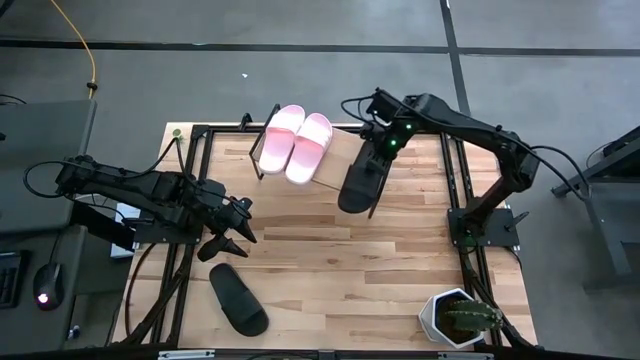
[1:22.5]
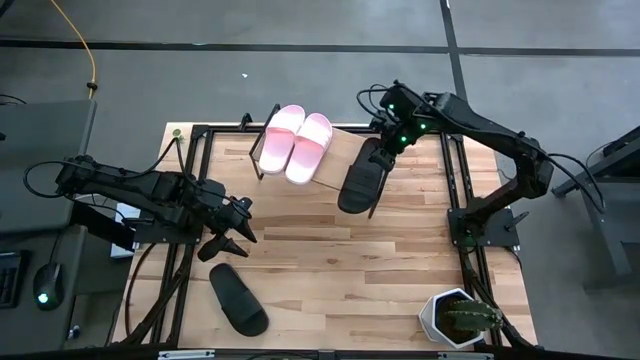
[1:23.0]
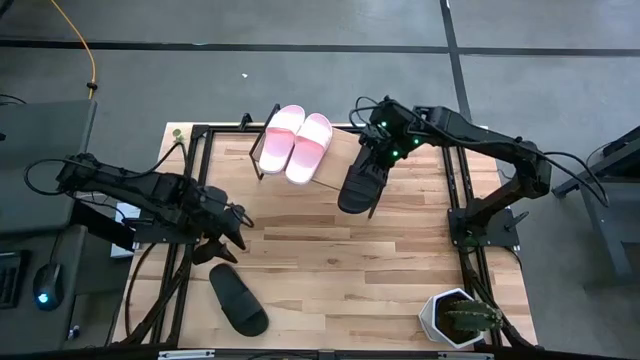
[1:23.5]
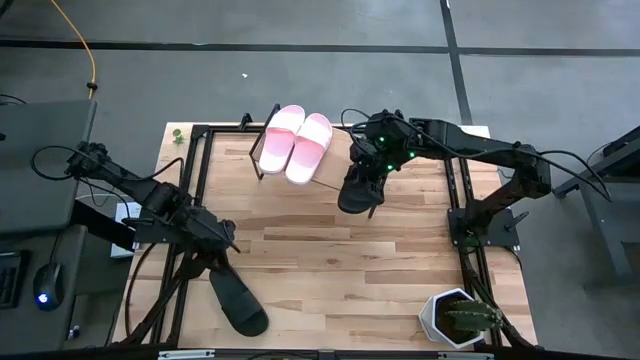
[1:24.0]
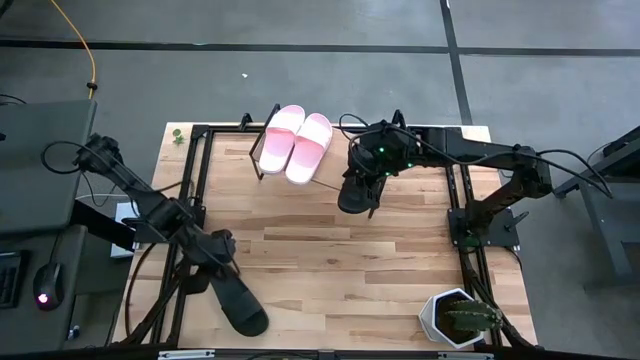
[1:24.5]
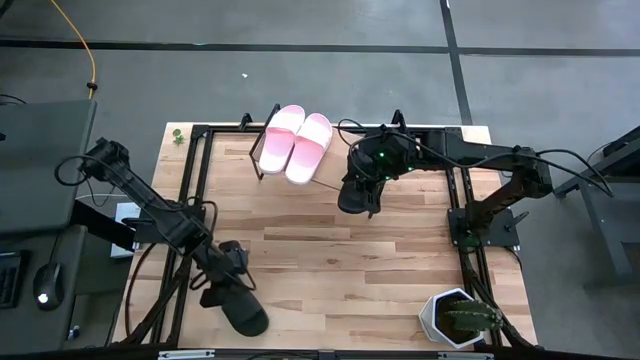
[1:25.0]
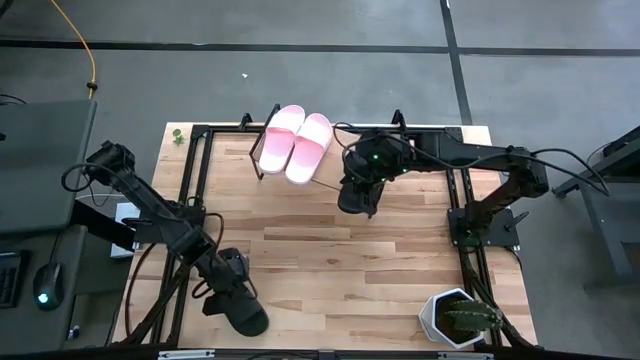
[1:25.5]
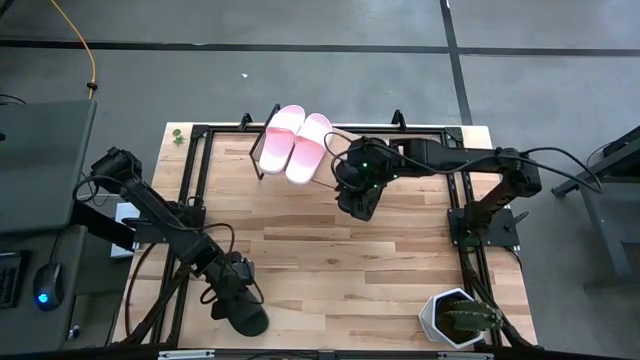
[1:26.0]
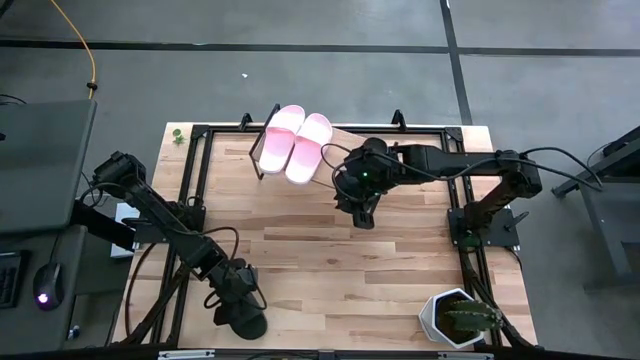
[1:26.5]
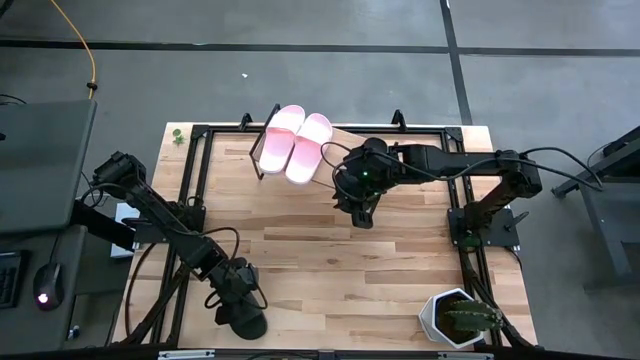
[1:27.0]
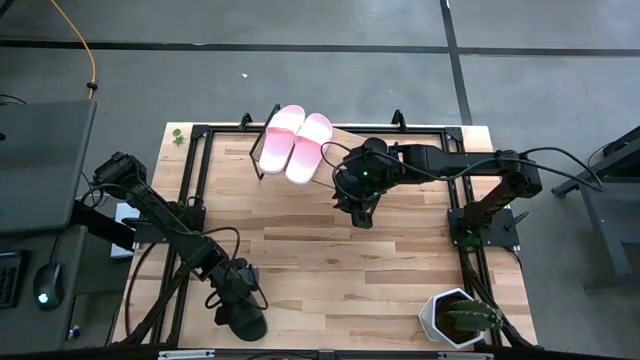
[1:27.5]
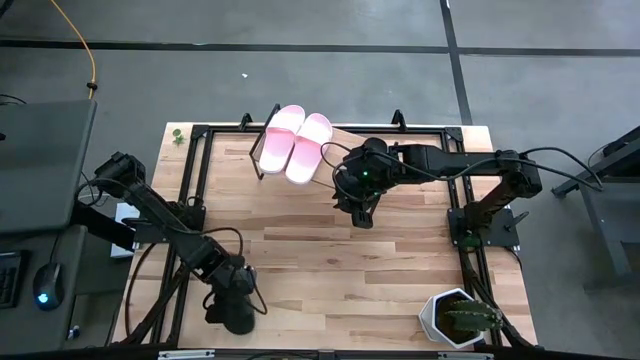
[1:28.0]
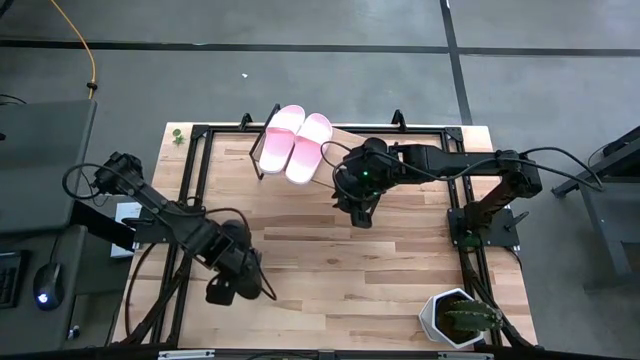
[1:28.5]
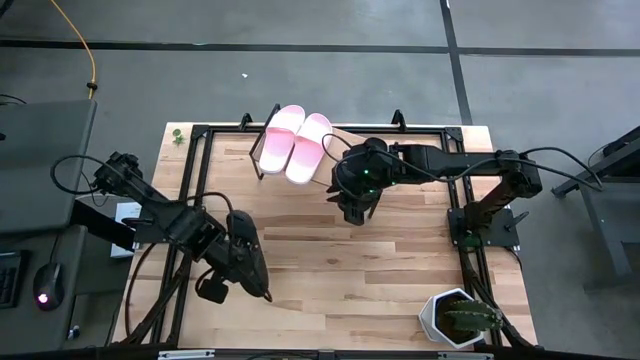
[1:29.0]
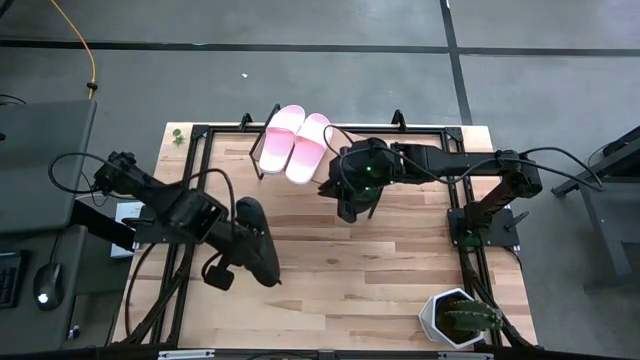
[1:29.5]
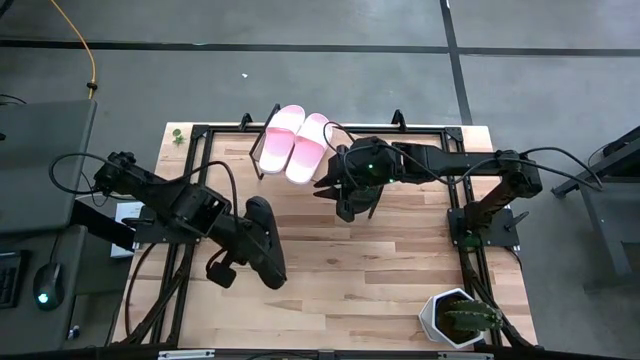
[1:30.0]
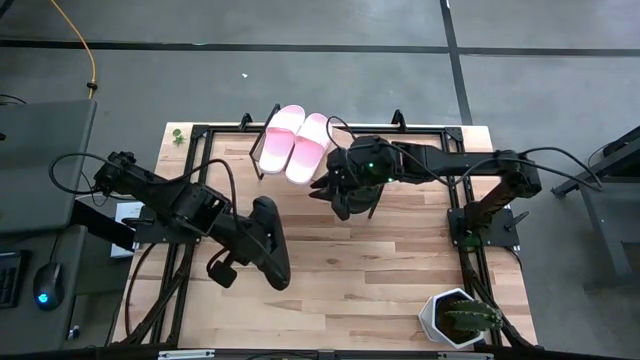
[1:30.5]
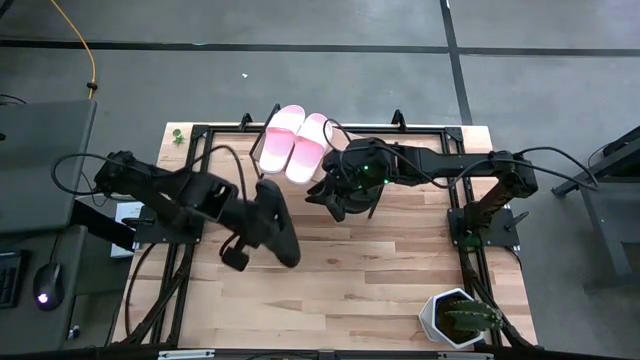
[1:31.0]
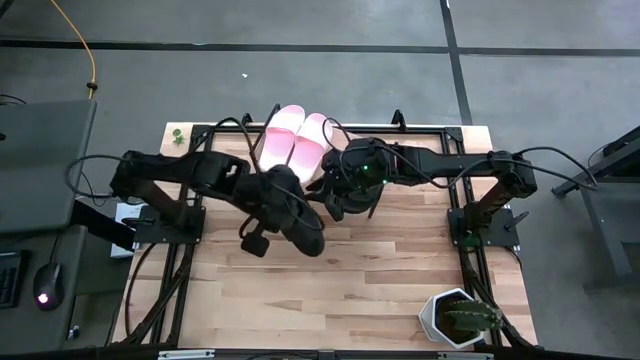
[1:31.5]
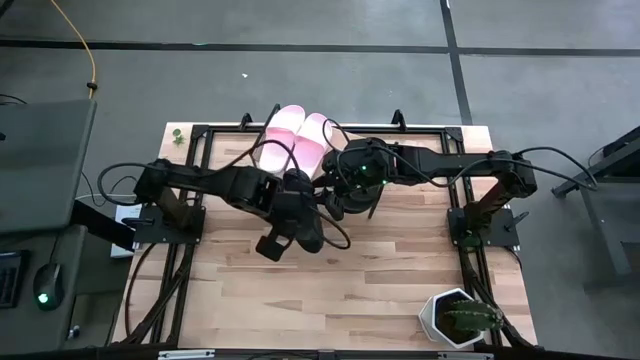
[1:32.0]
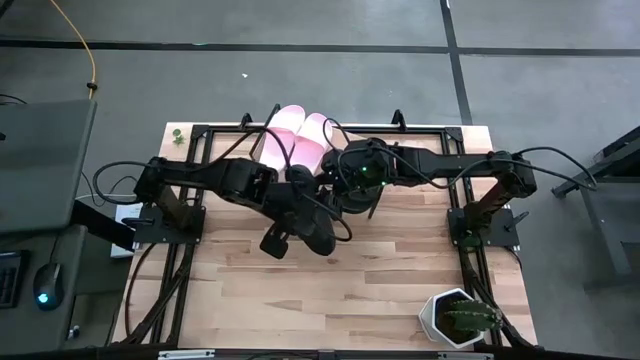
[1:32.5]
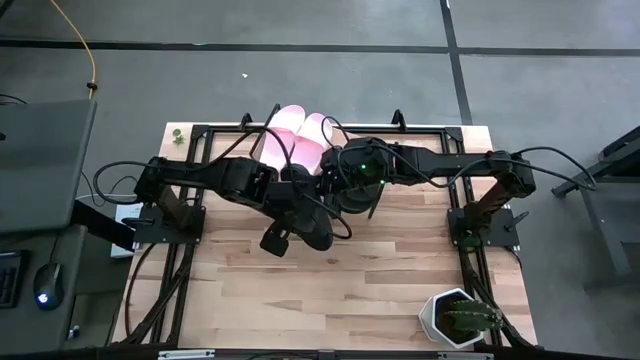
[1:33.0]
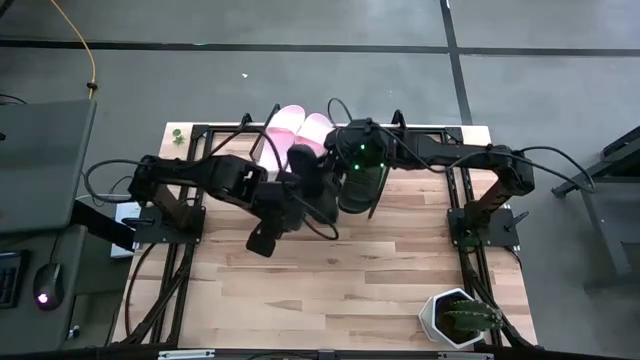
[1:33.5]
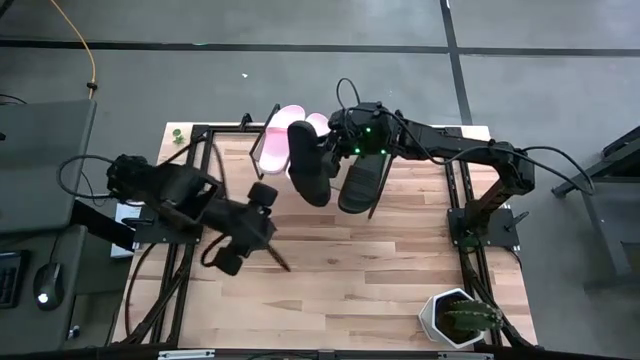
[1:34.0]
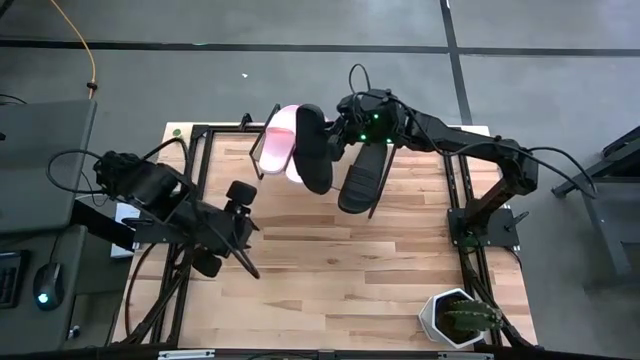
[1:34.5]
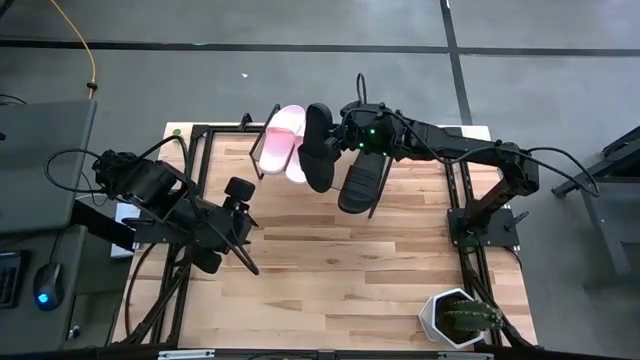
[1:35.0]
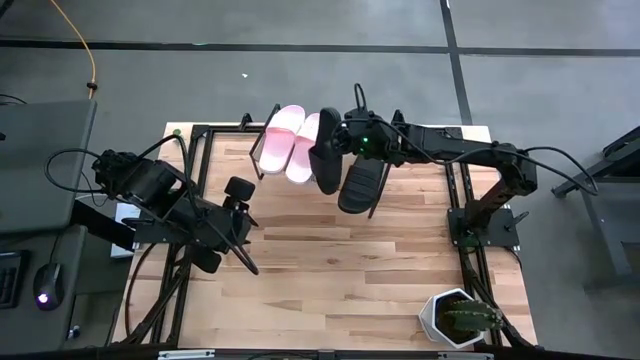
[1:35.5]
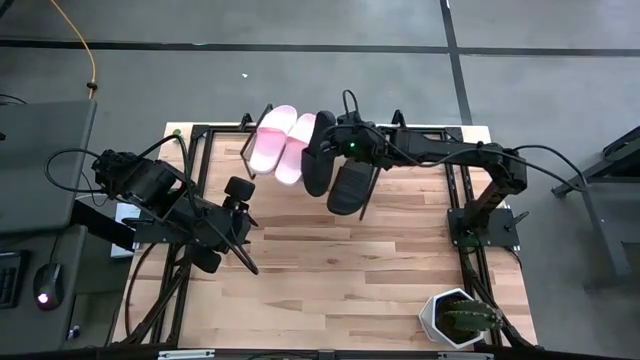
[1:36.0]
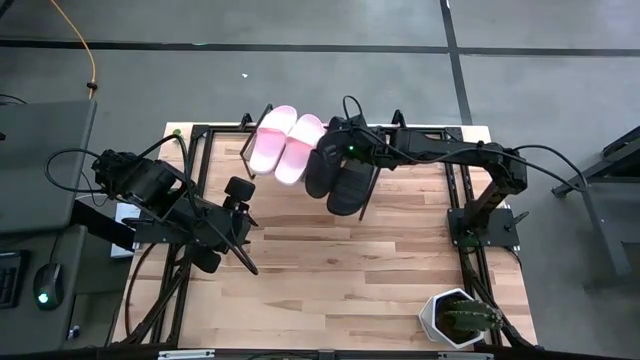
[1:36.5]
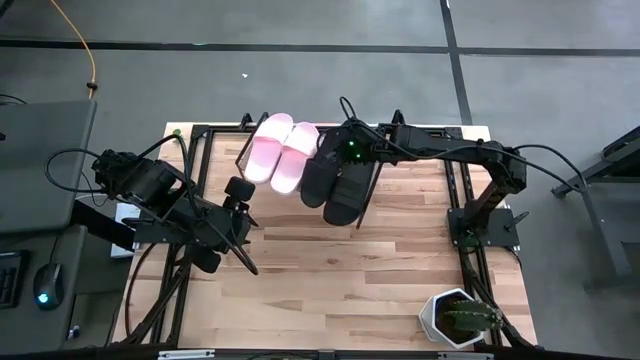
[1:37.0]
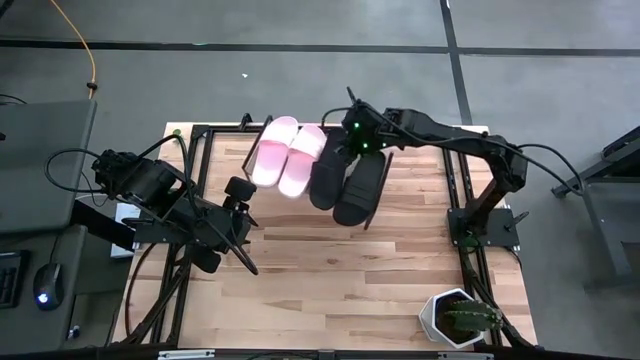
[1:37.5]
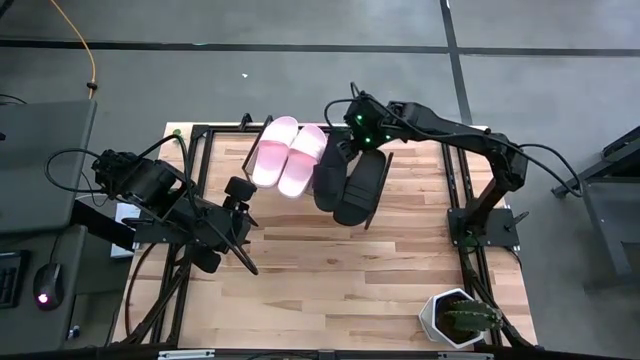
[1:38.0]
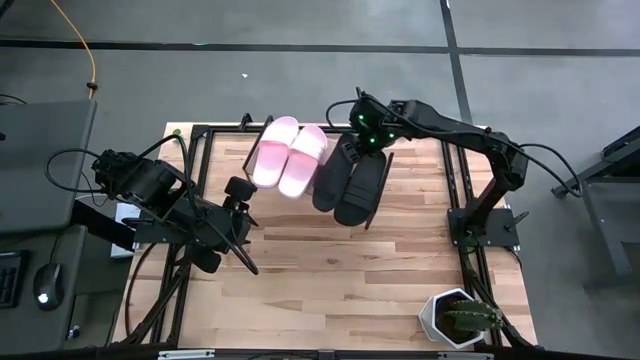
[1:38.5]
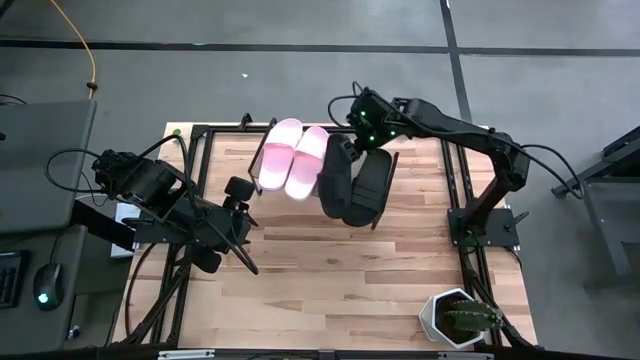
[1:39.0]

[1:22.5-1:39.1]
Task: Pick and place slides into the shelf
Put the black slide on the shelf

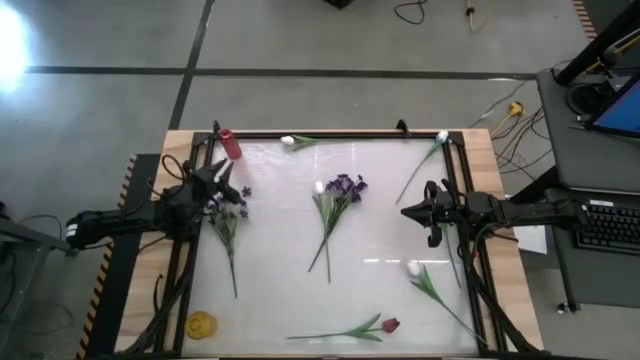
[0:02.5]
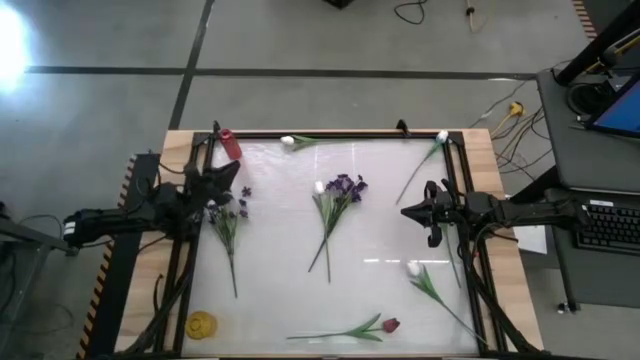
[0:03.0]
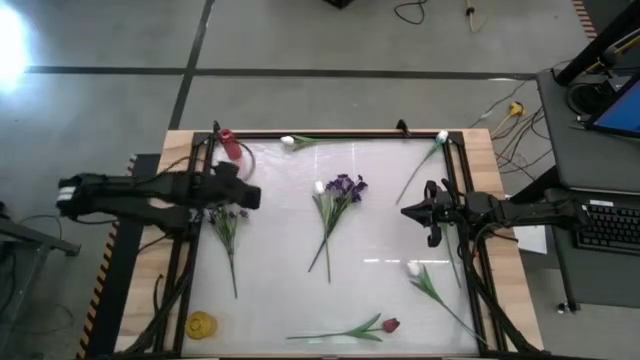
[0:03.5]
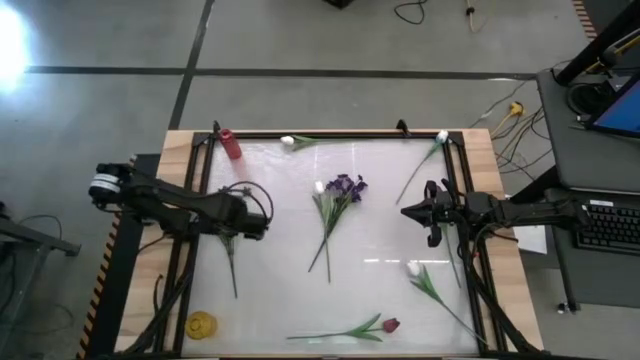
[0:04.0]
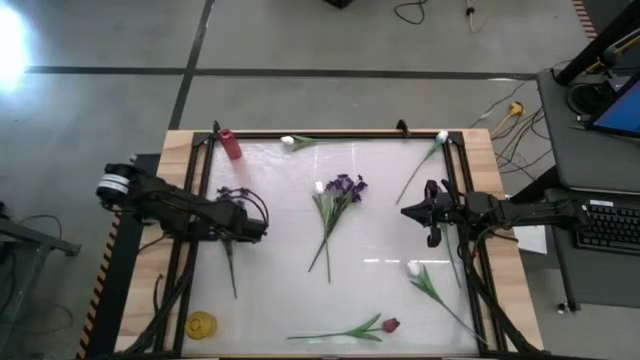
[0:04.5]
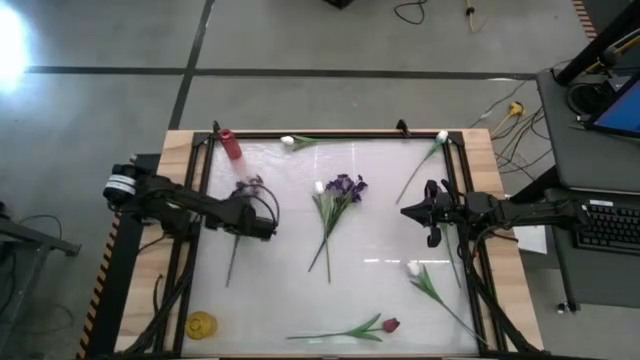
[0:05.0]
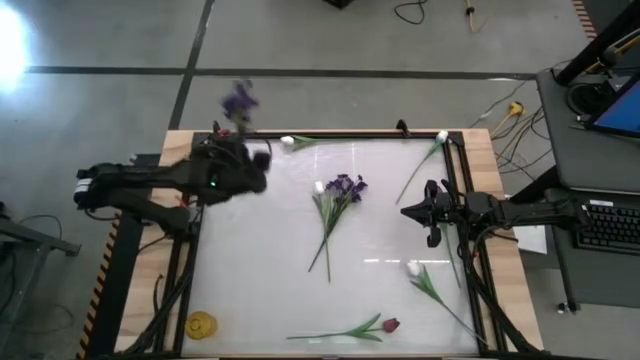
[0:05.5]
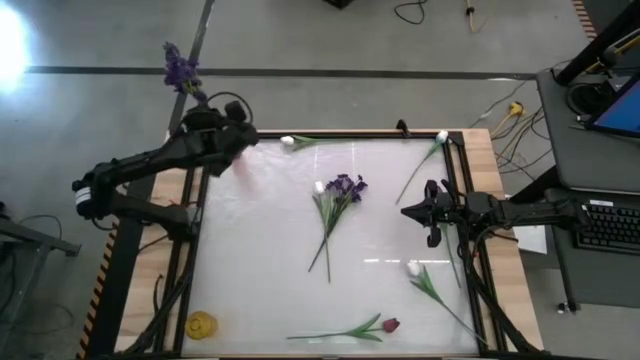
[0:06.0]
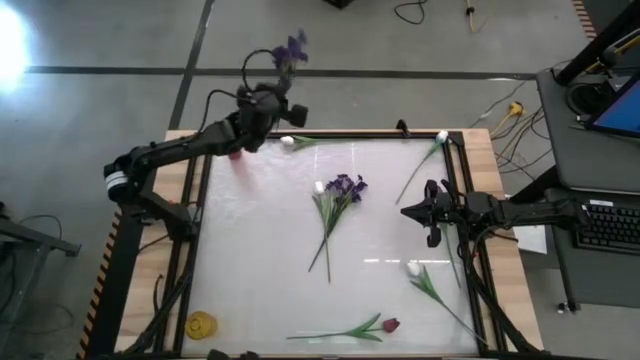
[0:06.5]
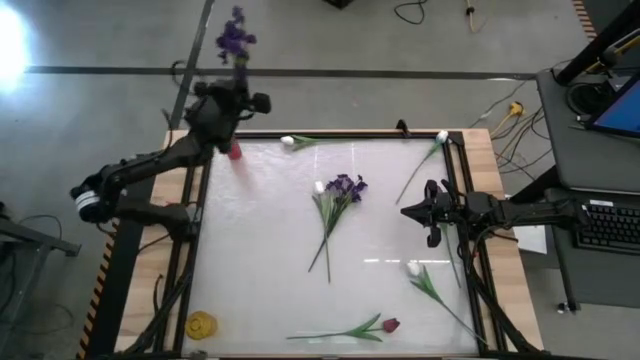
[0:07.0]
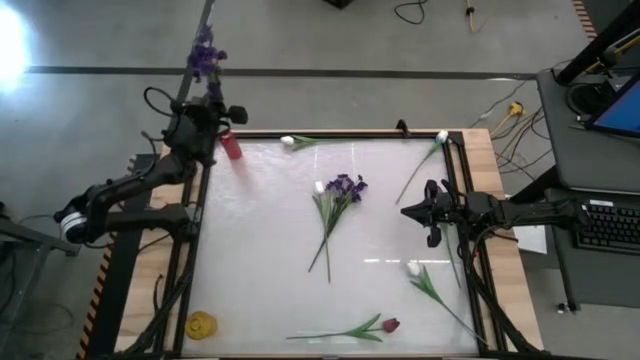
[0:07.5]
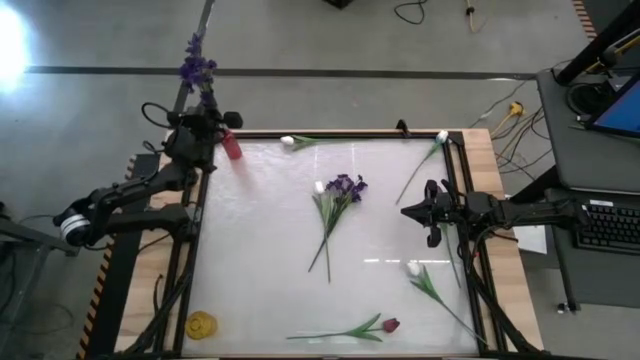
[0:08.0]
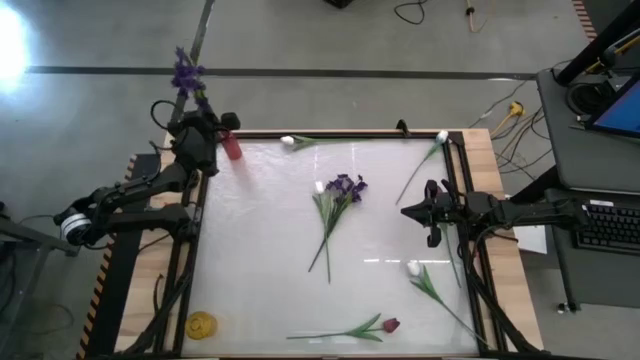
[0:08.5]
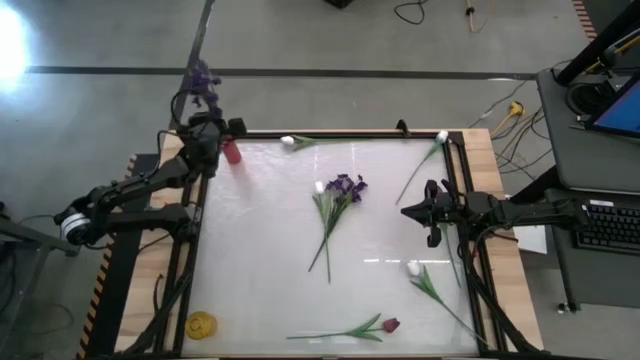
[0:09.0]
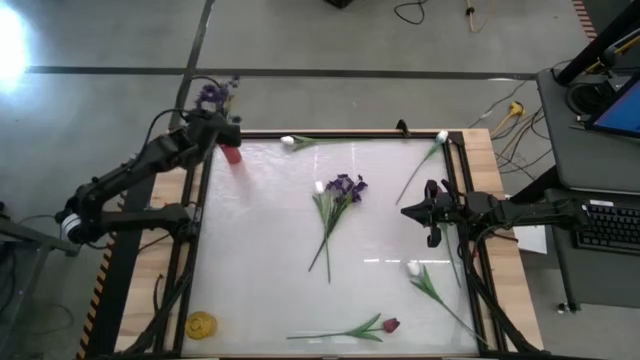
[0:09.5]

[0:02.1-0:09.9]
Task: Sort flowers into vase by color
Put the left violet flowers into the red vase
